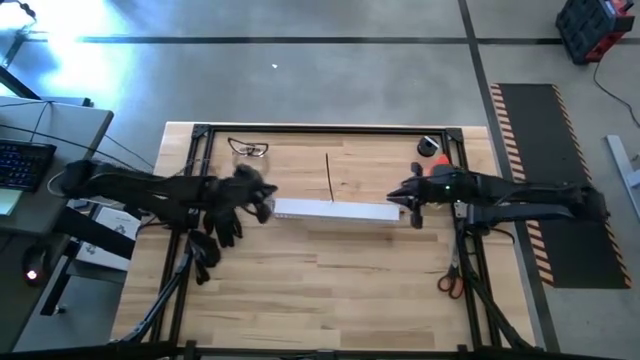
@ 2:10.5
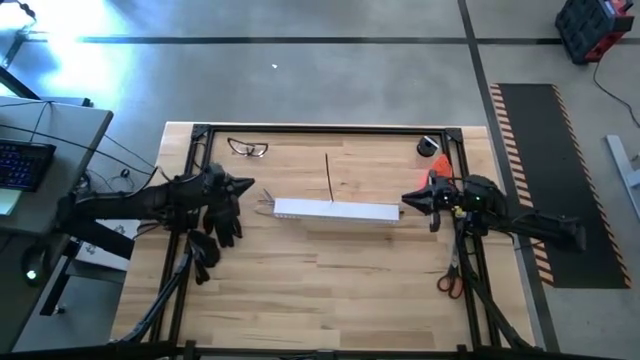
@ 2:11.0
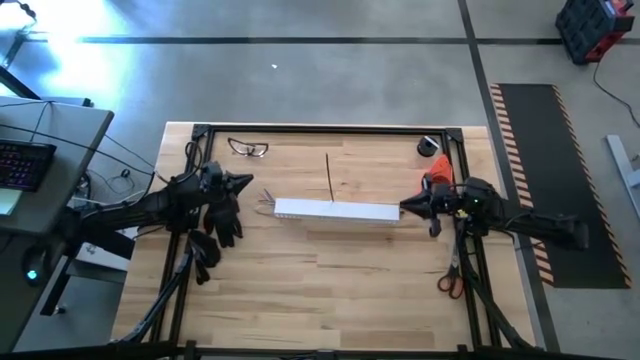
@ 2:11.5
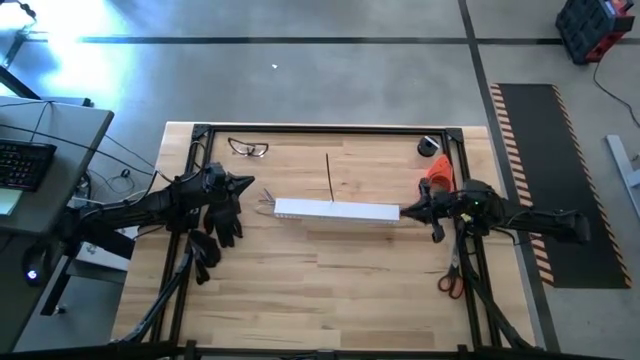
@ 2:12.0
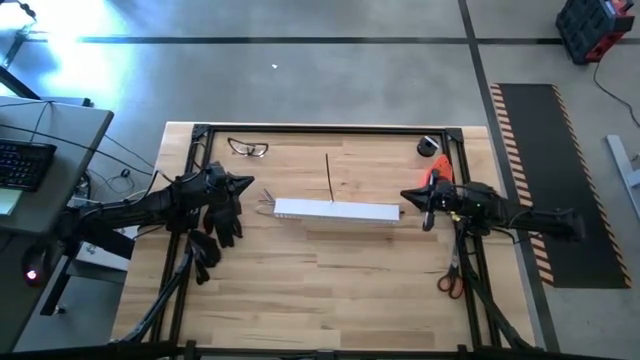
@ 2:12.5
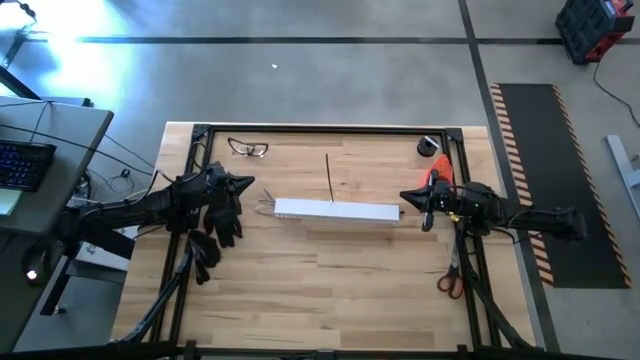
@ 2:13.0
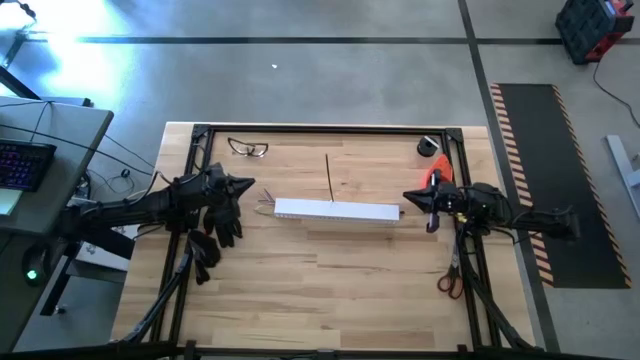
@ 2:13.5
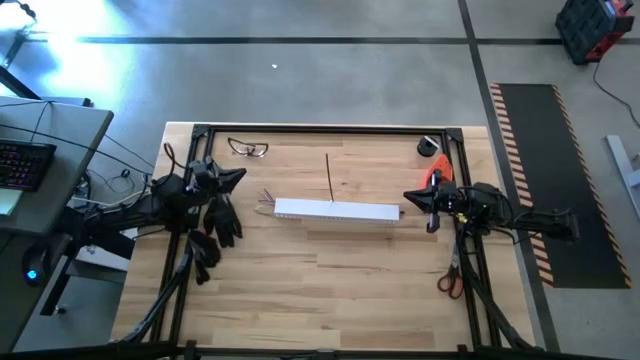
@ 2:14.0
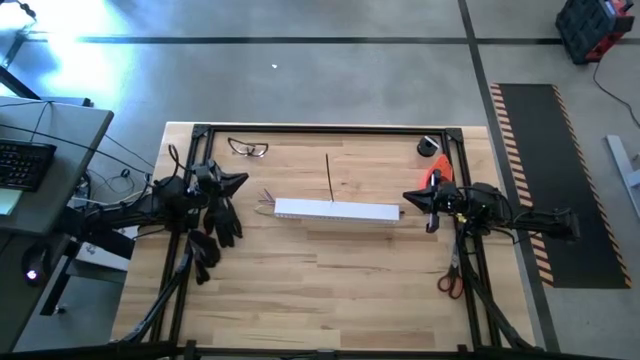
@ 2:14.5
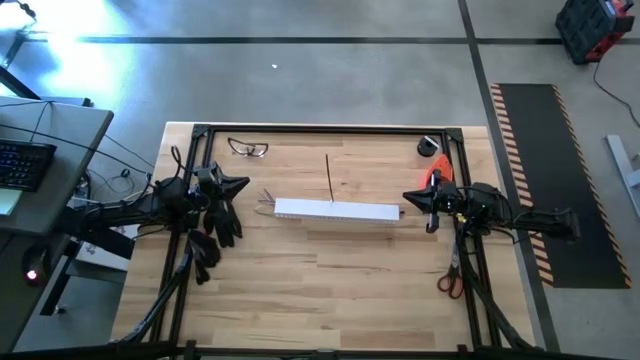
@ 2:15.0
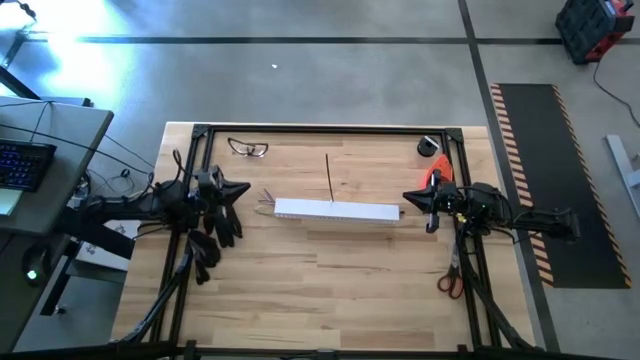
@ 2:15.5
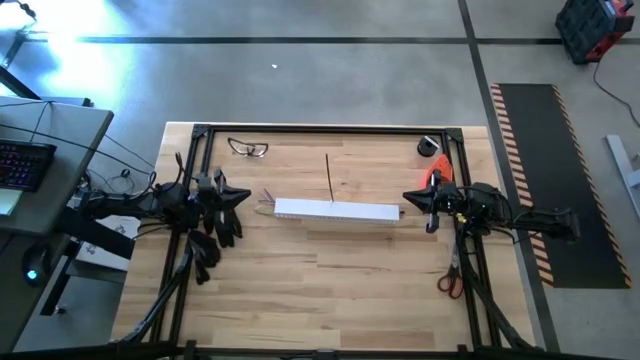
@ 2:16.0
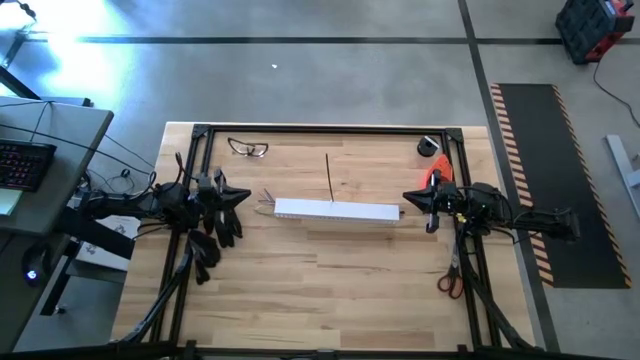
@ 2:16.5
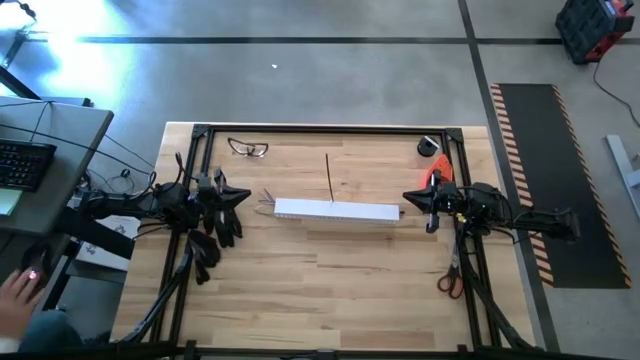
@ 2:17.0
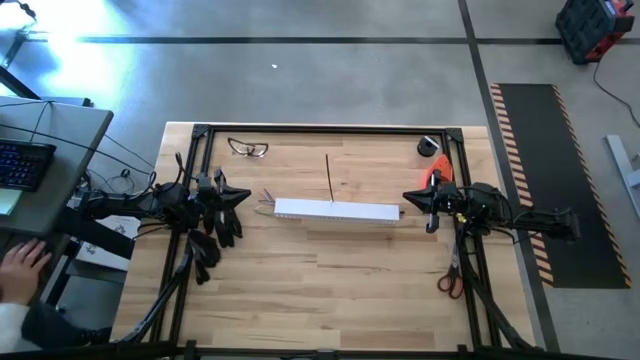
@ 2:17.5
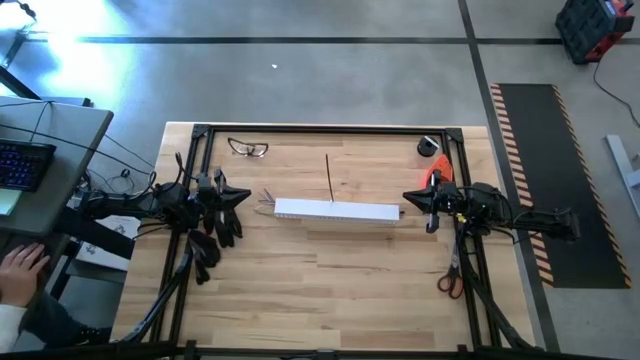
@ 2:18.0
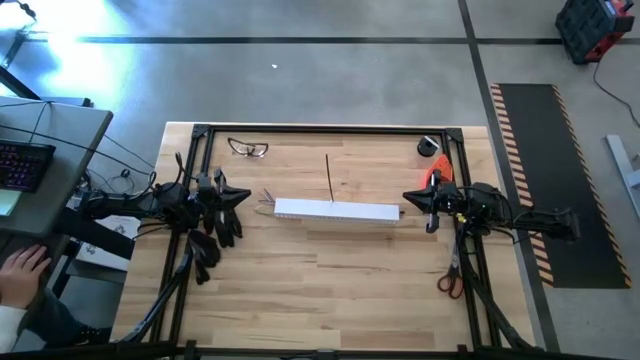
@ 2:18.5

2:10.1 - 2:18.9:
Task: Ziptie cables
Return to Home Position

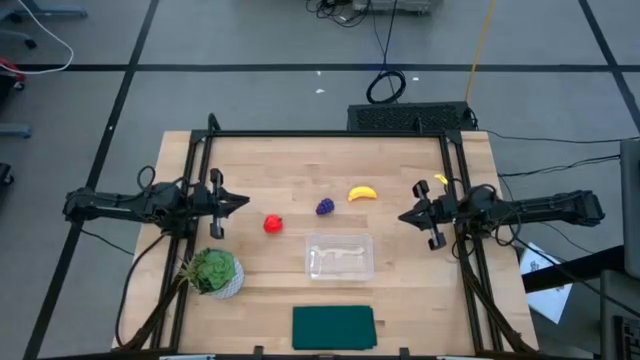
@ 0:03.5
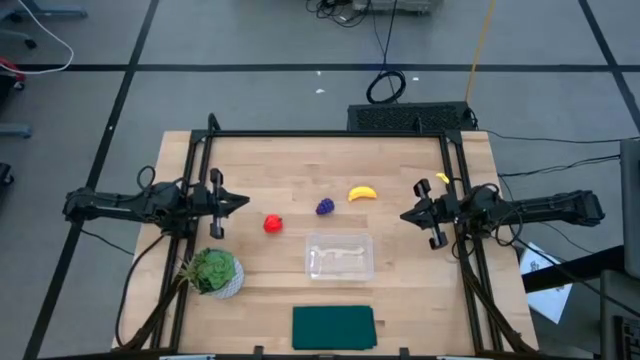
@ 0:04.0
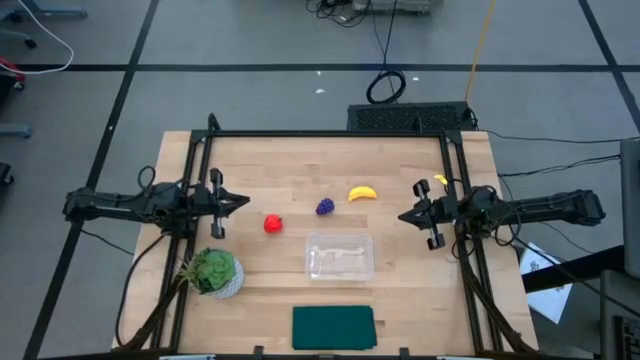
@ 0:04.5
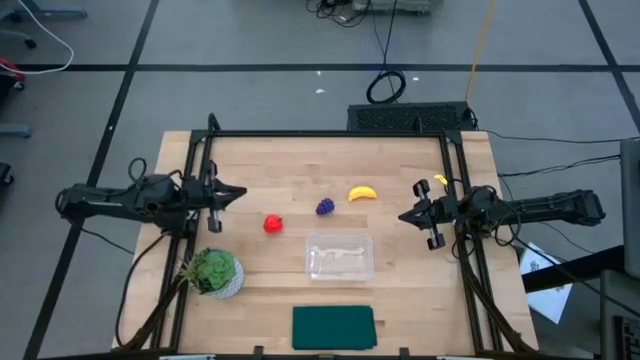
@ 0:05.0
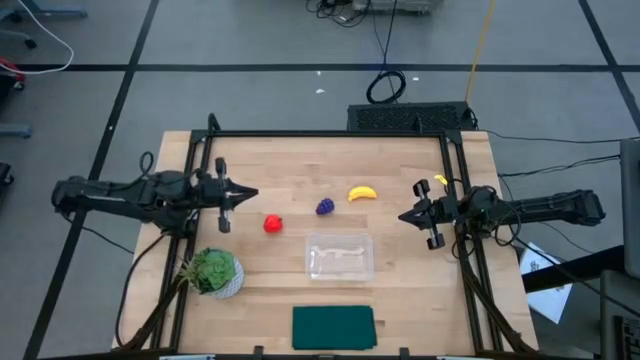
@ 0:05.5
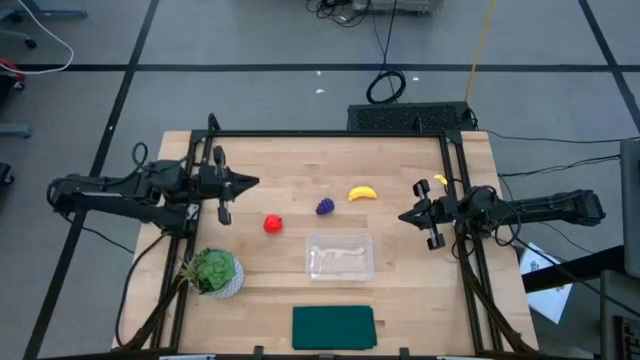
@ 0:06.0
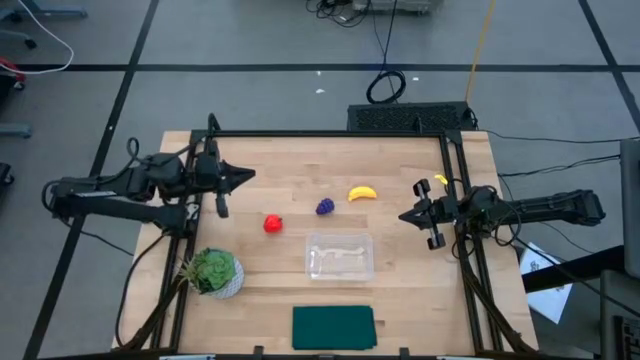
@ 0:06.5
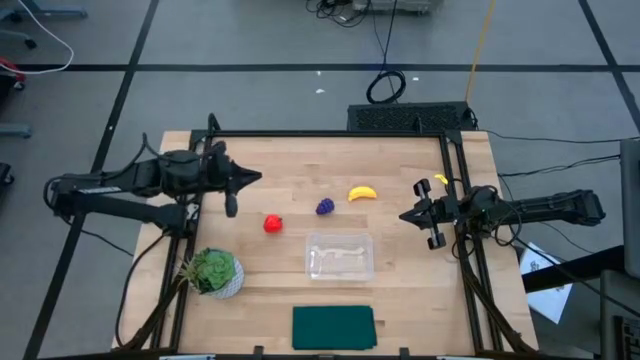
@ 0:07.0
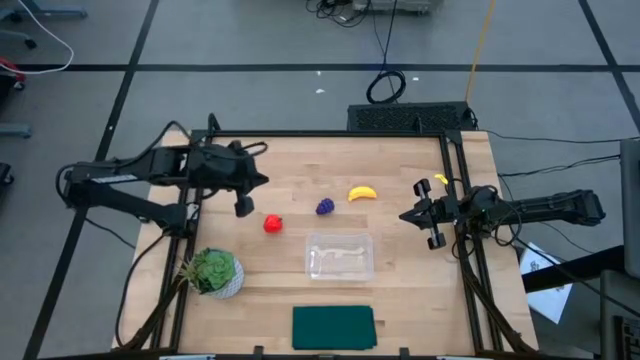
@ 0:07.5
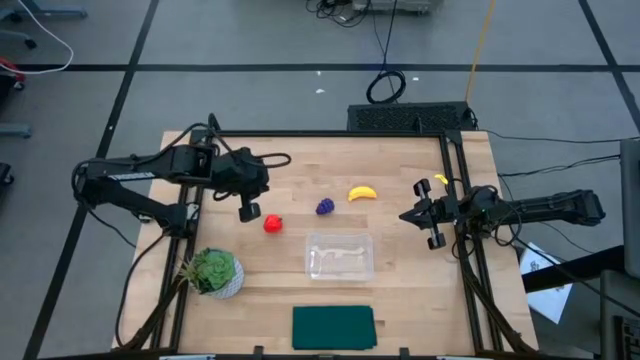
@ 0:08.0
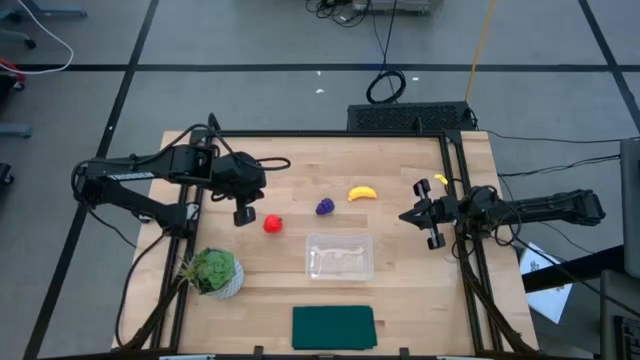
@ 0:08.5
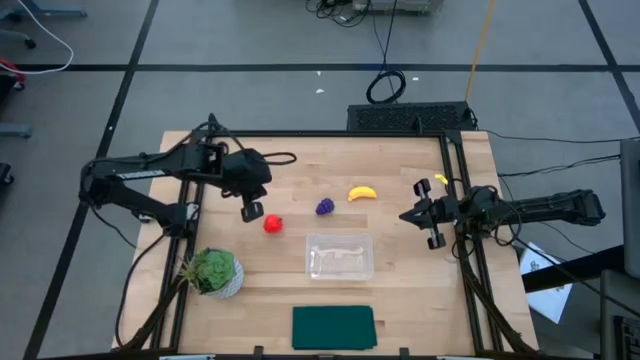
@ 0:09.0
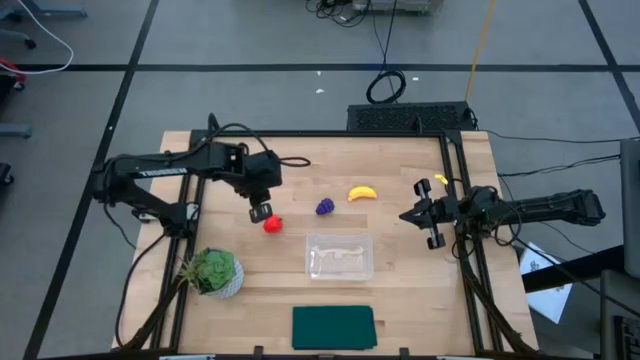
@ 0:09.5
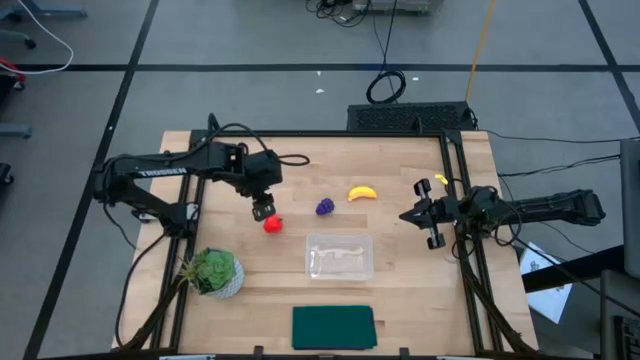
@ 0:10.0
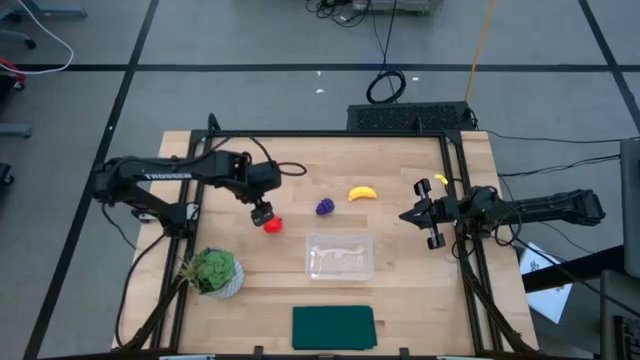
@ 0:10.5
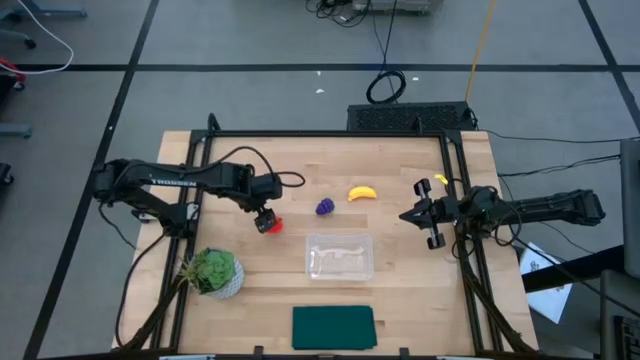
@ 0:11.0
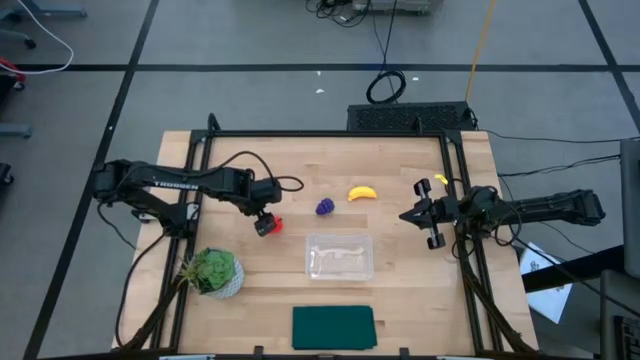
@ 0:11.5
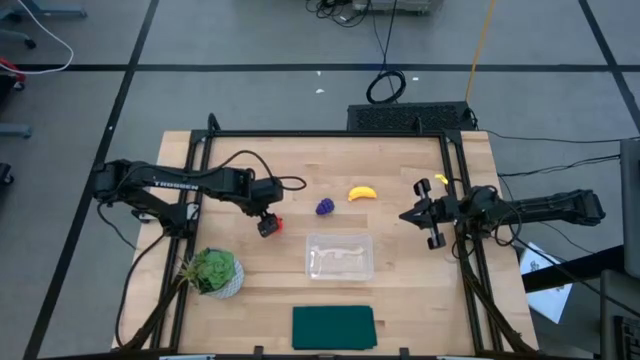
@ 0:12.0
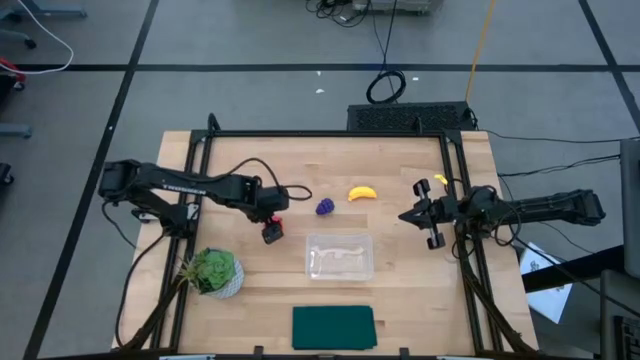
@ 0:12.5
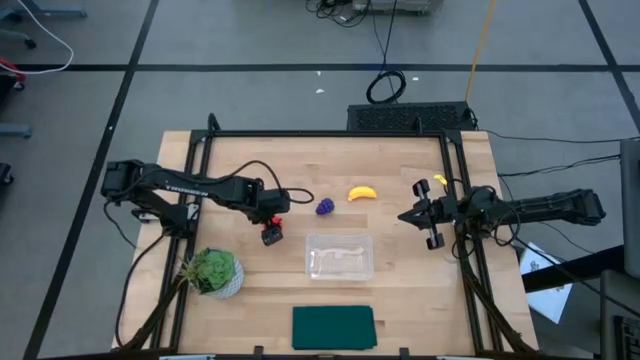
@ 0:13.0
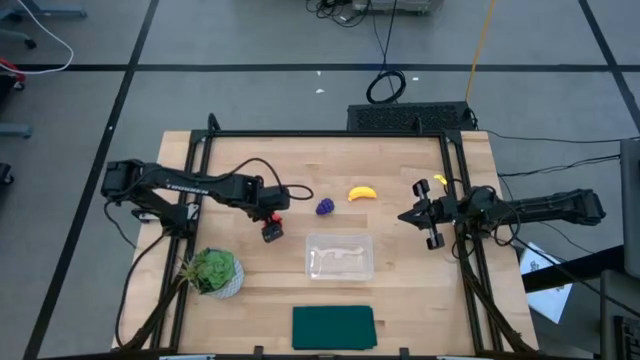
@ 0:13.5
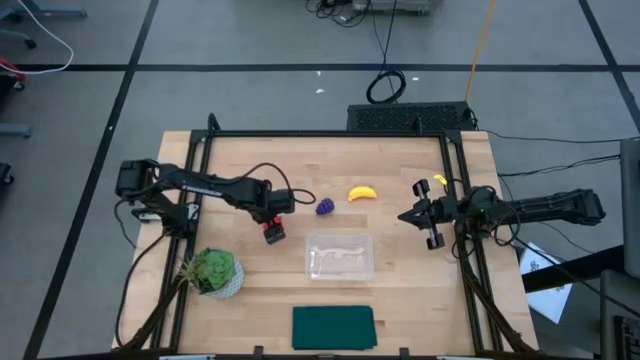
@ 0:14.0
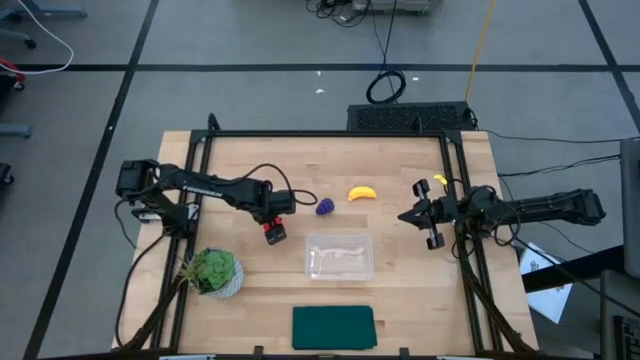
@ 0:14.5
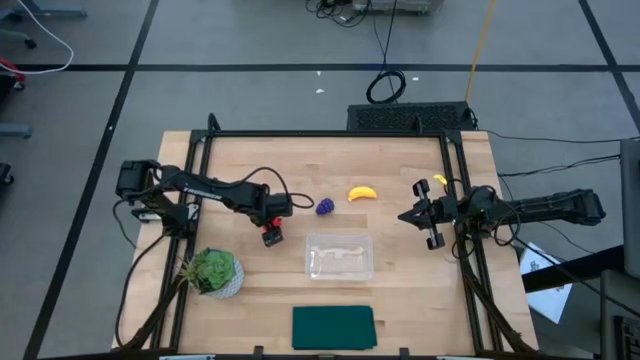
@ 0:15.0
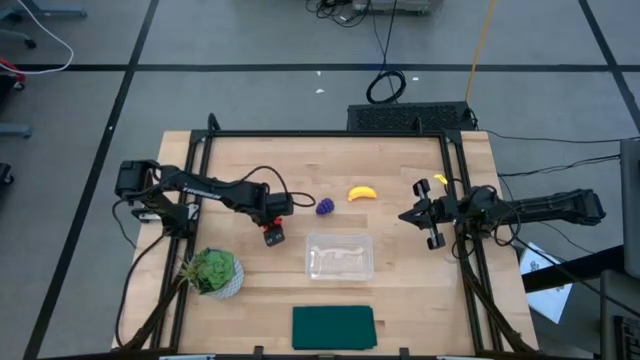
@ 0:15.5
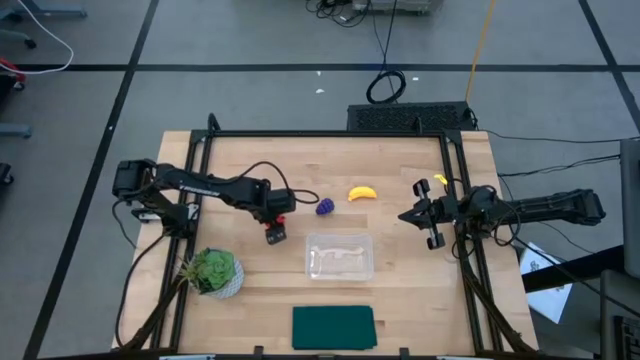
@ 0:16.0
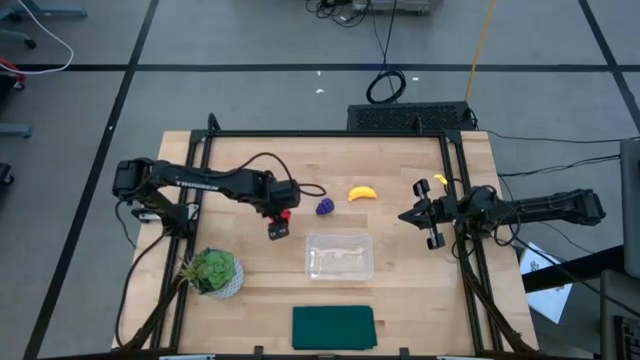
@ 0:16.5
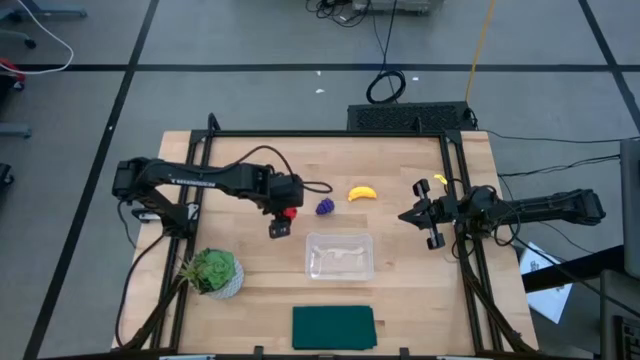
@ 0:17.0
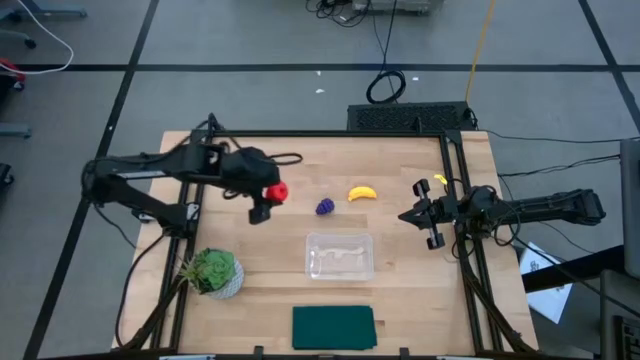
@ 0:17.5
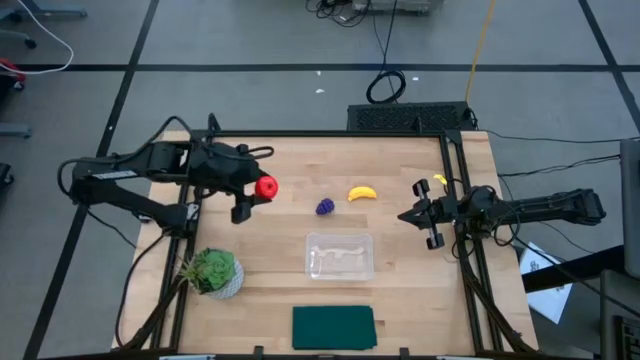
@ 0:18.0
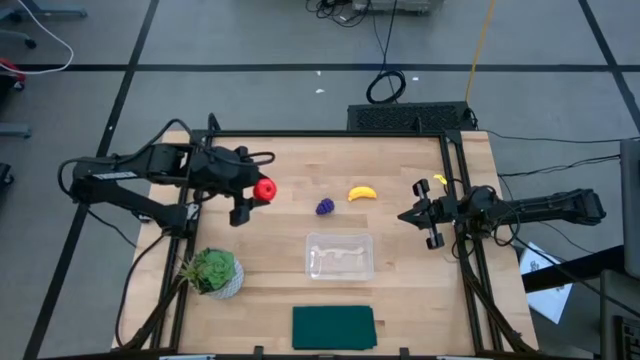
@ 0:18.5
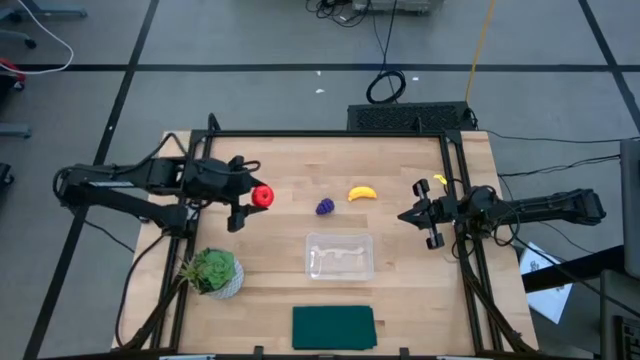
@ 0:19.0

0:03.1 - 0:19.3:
Task: Pick and placing Produce into tupperware
Put the apple into the transparent bin
